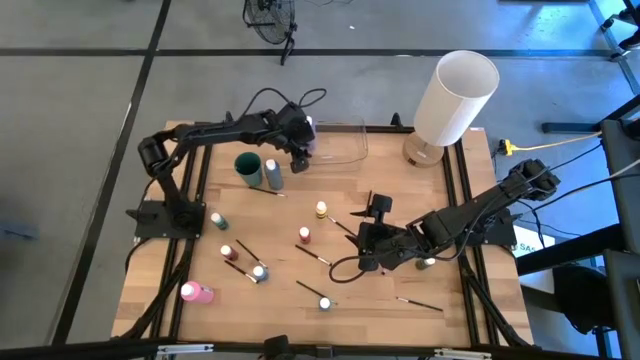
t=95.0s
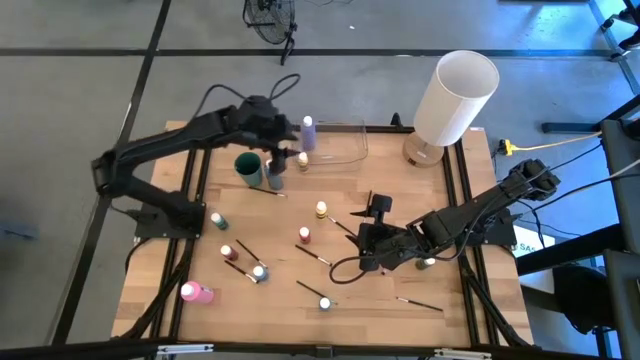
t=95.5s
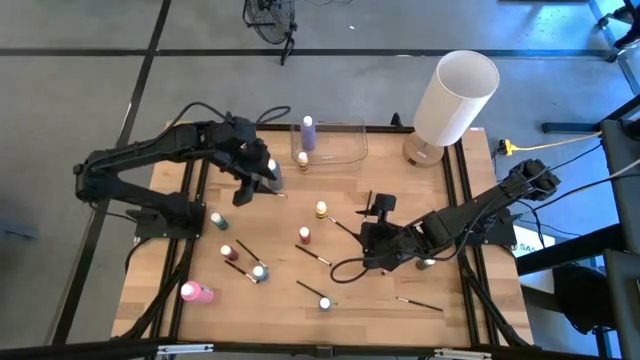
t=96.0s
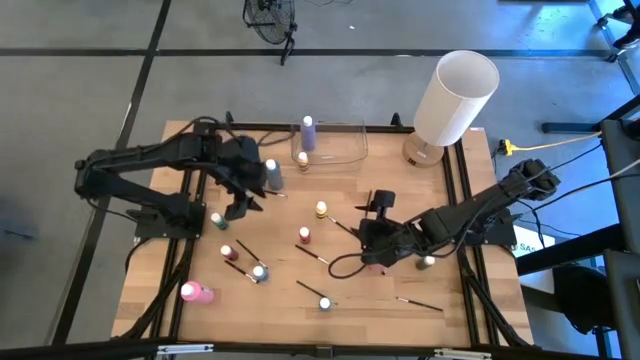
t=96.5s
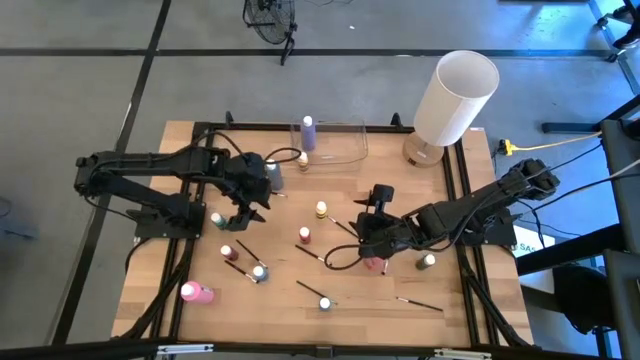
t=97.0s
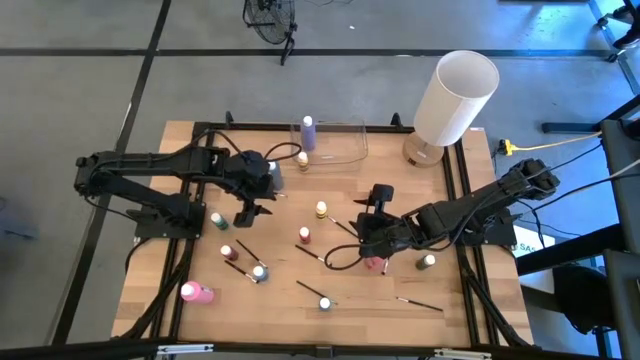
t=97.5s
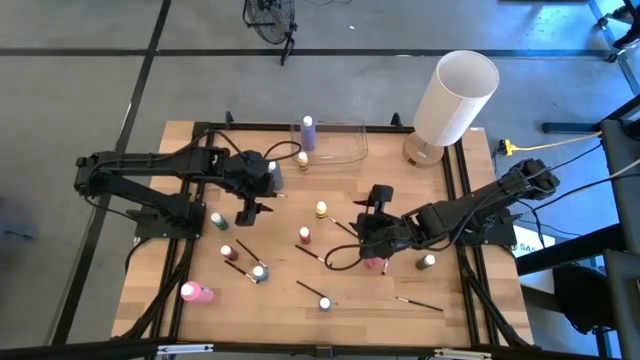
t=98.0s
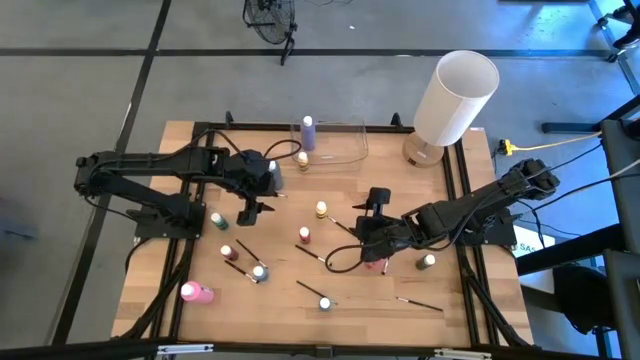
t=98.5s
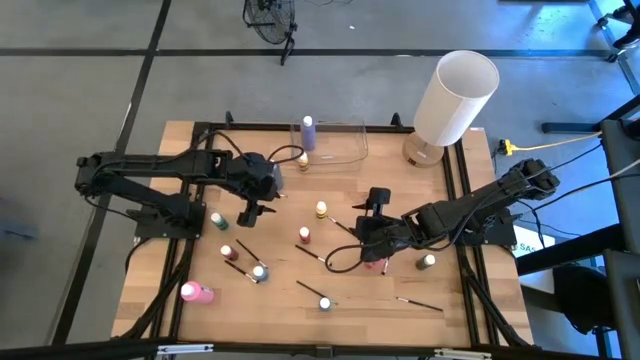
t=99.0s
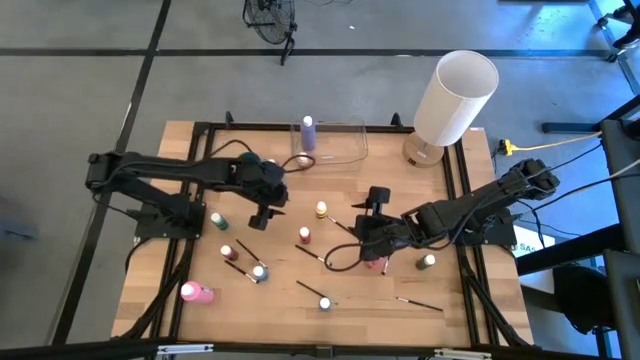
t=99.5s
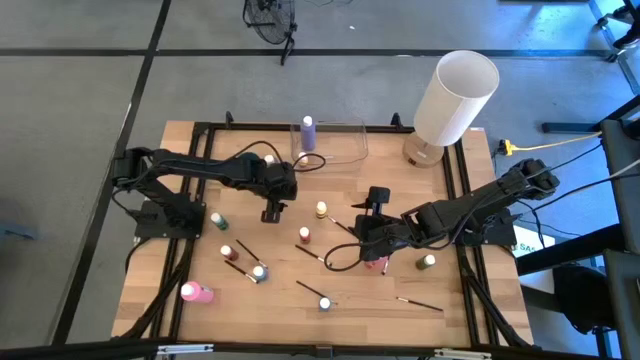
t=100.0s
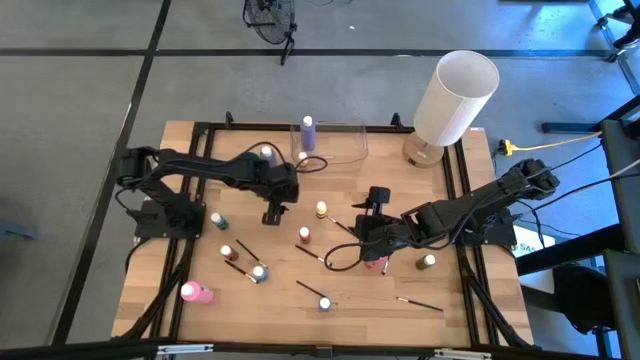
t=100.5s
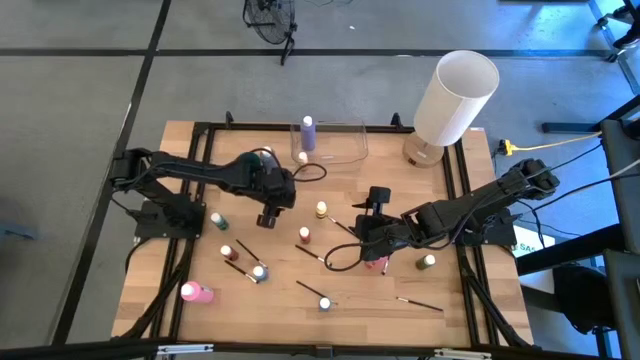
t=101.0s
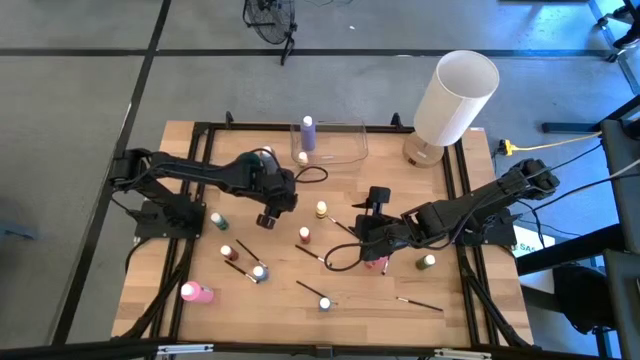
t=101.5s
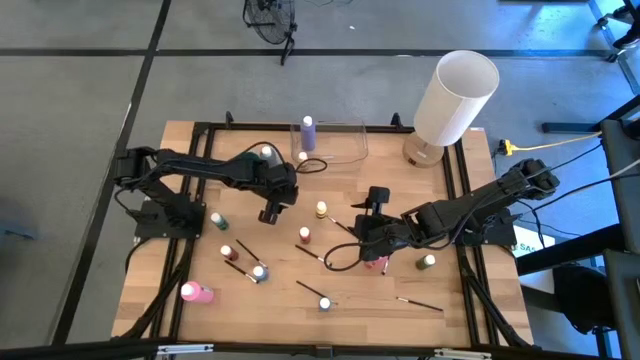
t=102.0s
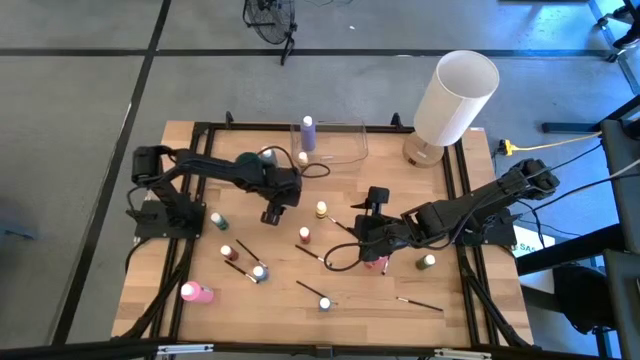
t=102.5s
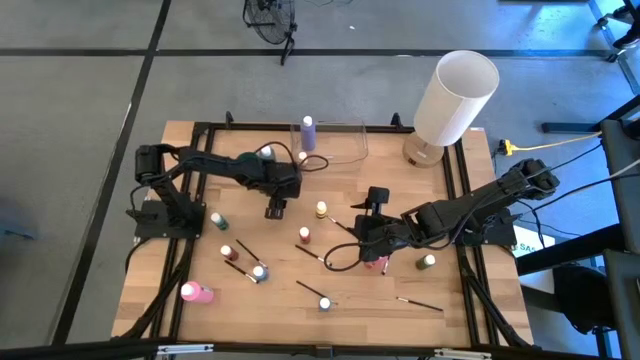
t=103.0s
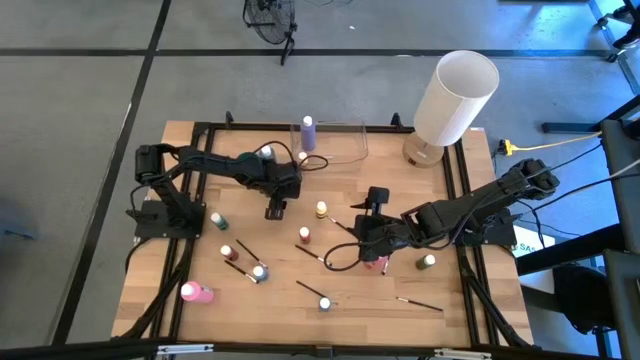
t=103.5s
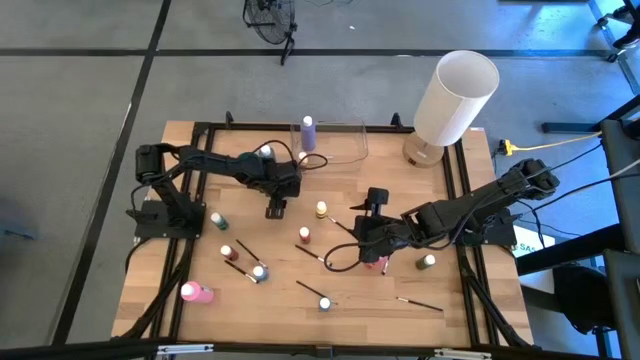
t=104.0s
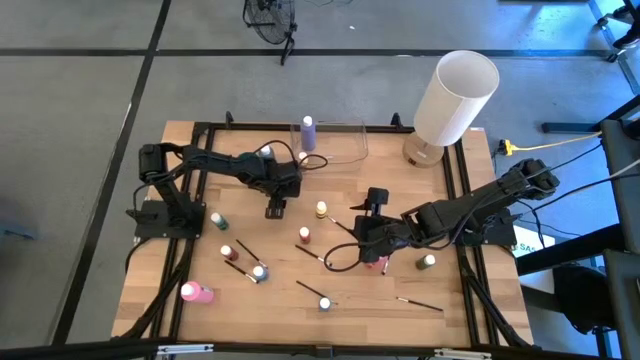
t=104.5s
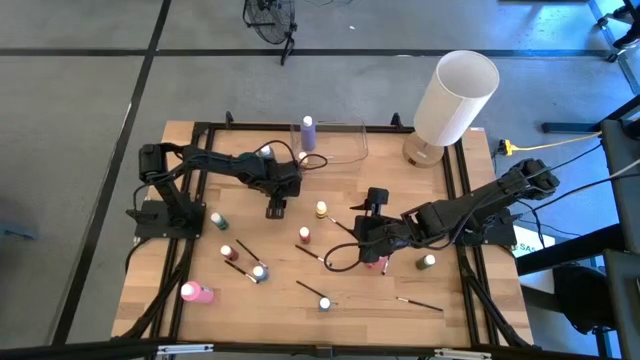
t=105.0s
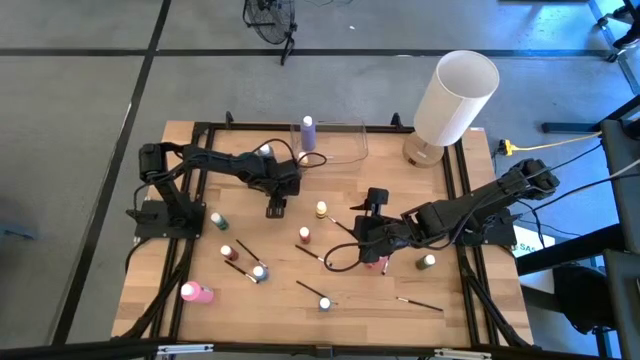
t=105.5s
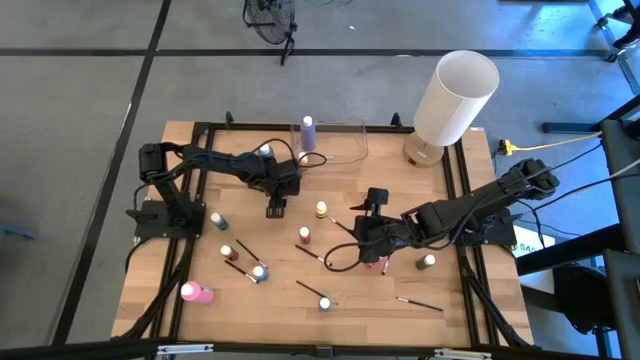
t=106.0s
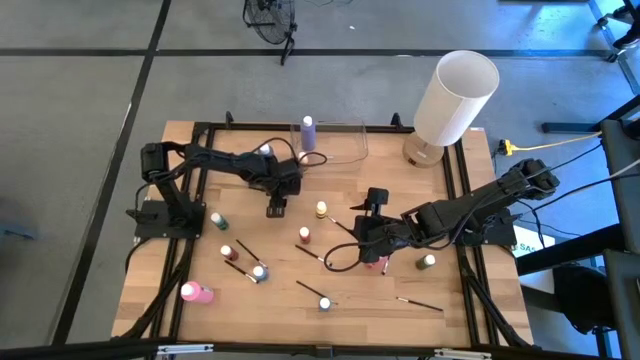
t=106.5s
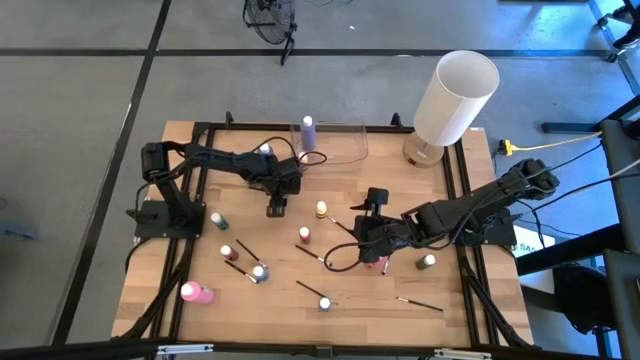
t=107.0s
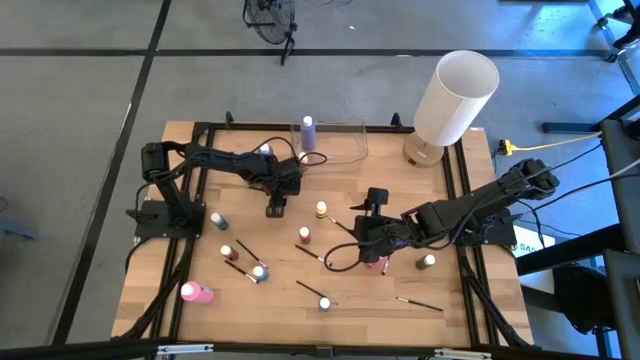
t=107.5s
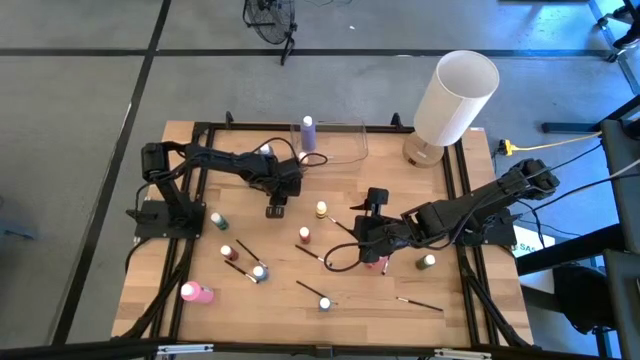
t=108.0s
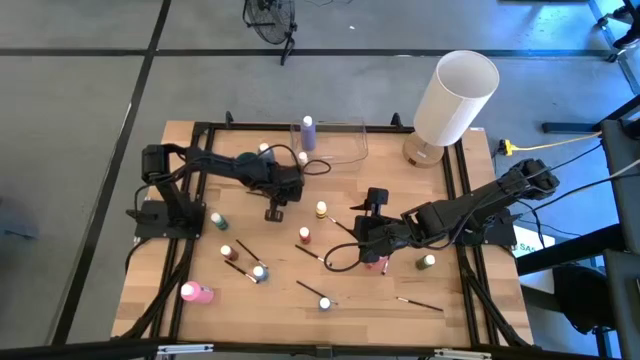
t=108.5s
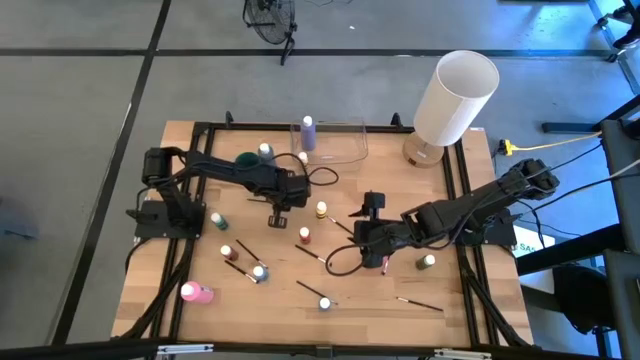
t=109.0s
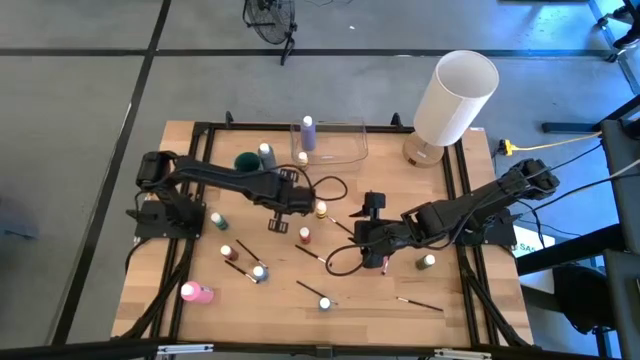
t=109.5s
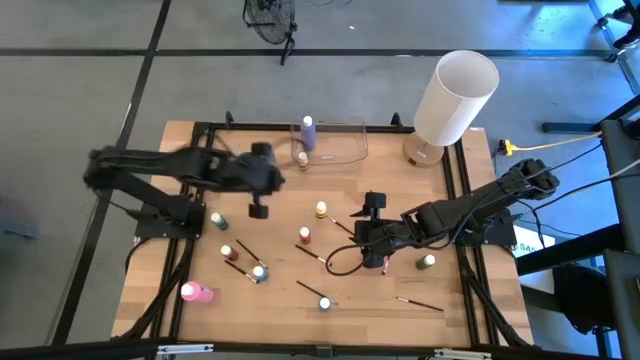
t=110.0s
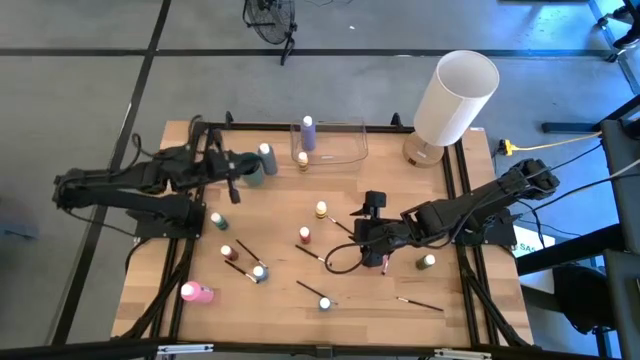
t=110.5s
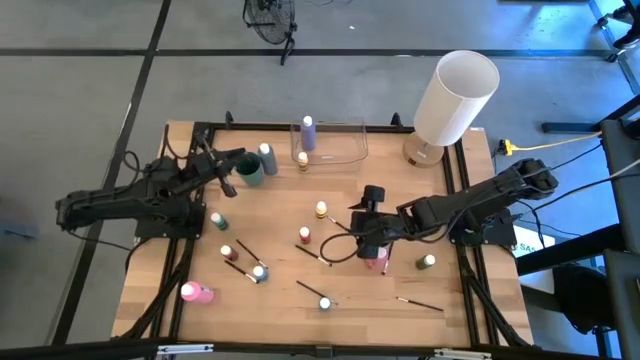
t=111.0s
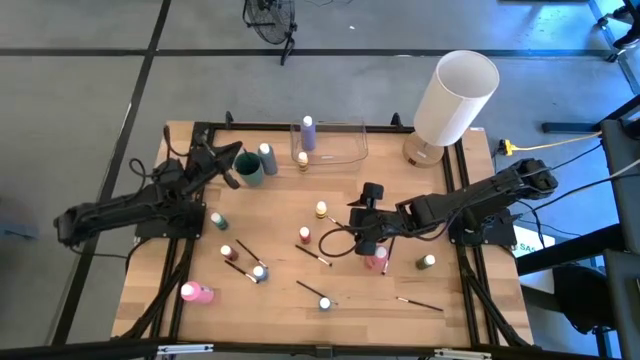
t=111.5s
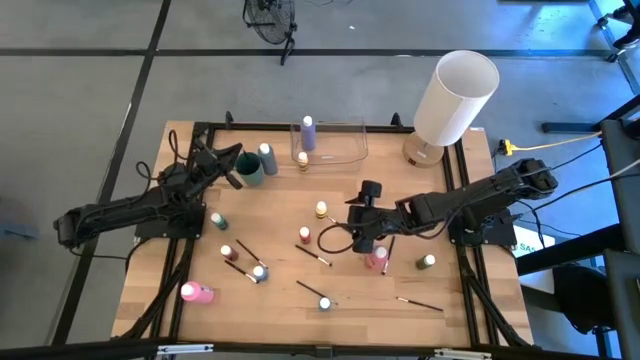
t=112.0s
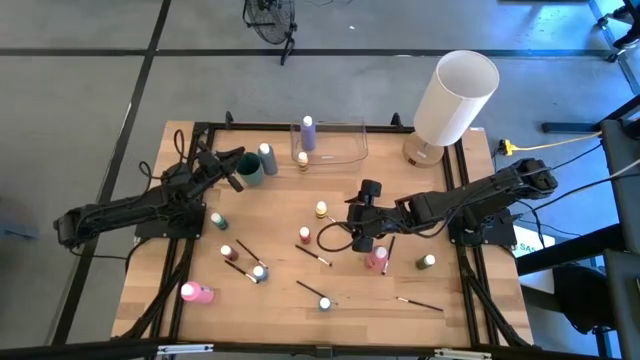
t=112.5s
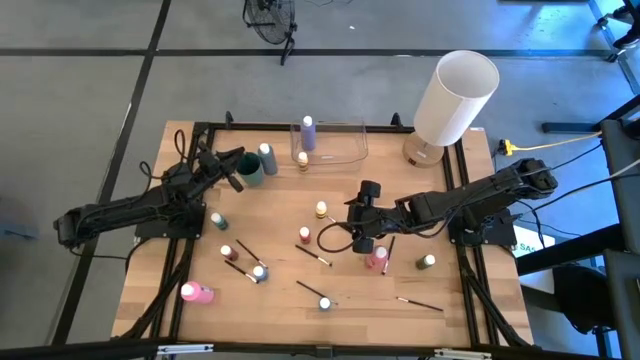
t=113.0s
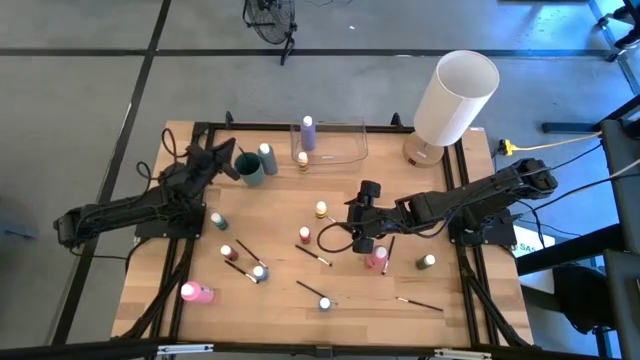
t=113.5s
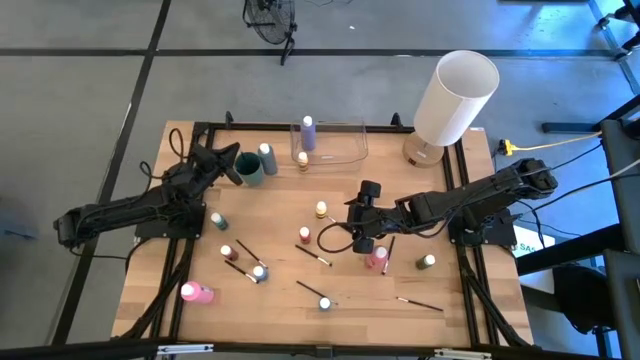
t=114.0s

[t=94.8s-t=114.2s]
Task: Pick & Place Paint Supplies
Put the silver paint brush into the green cup

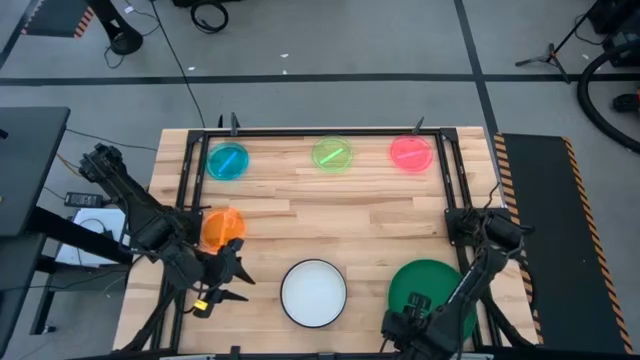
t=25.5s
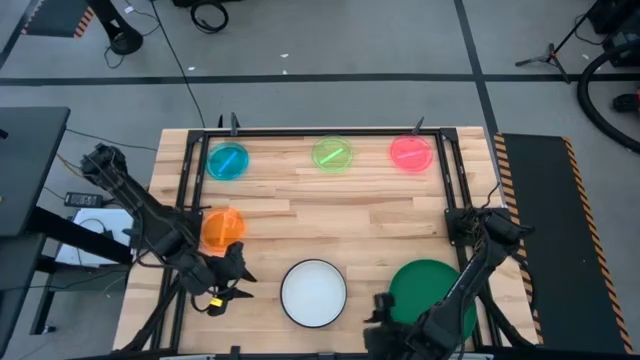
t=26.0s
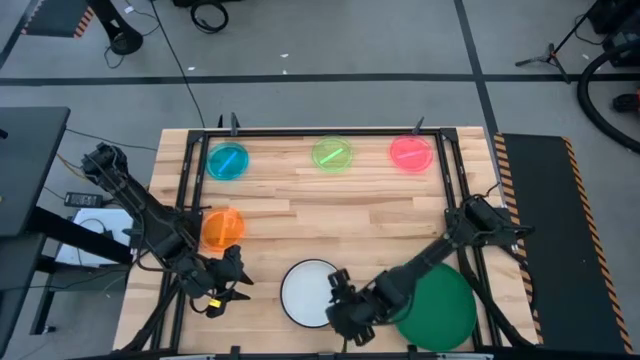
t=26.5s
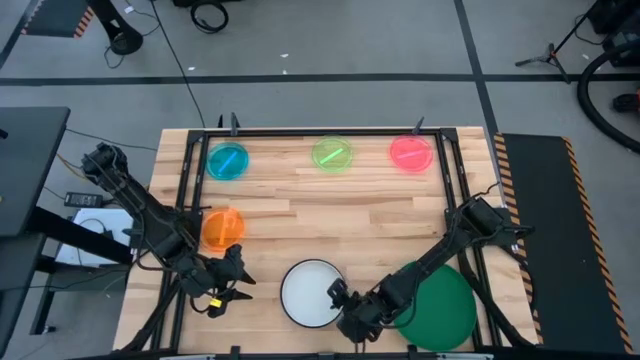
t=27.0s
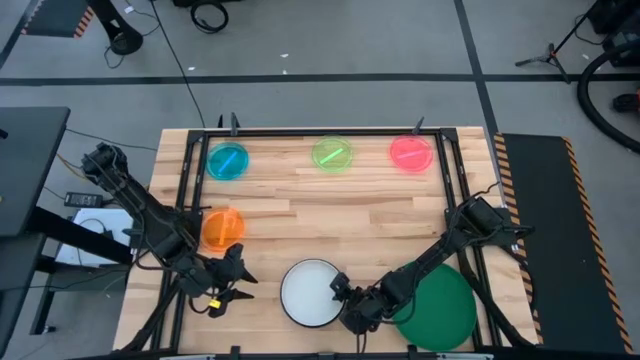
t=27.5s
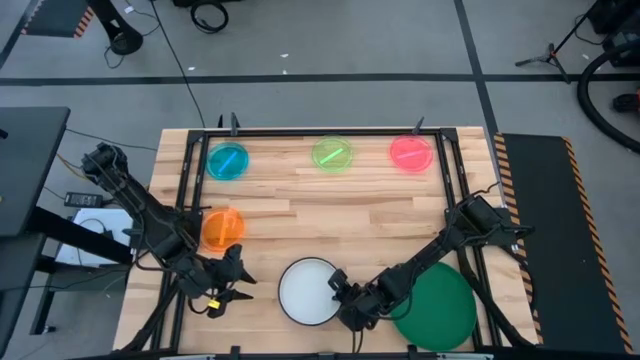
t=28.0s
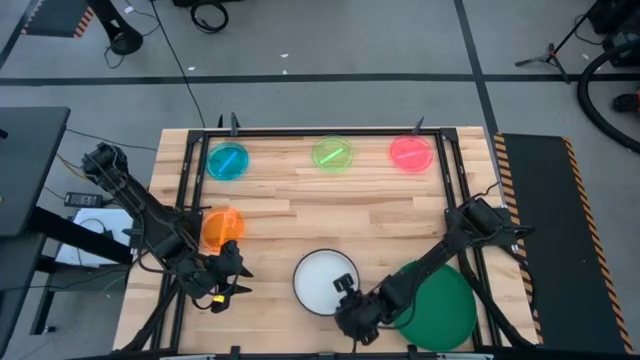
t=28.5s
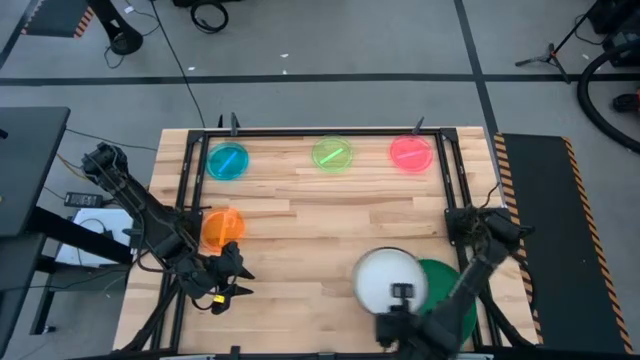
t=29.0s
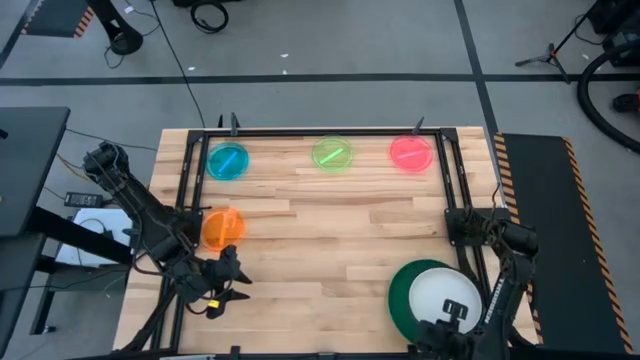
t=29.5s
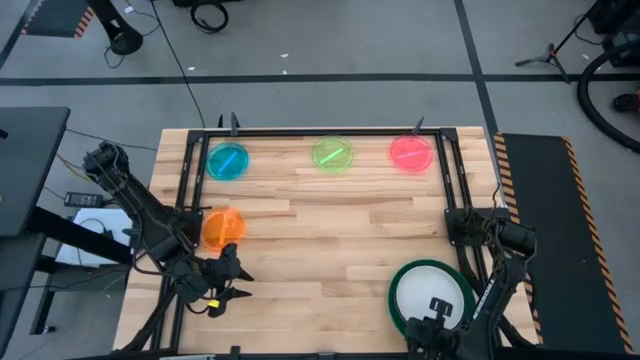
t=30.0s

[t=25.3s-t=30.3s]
Task: Stack plastic plates
Stack the stacked plates on top of the green plate
